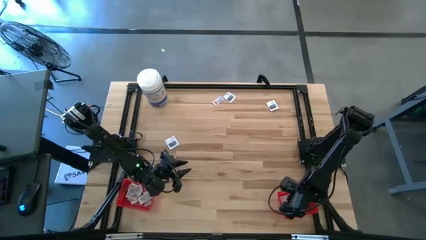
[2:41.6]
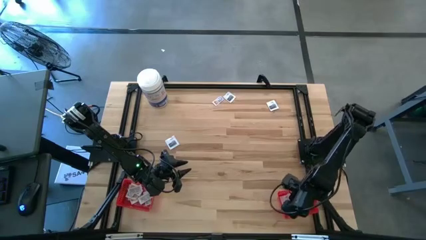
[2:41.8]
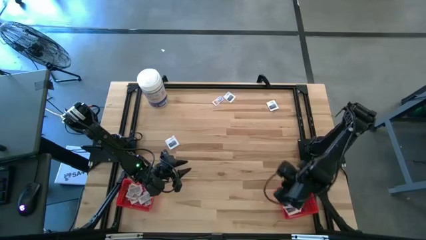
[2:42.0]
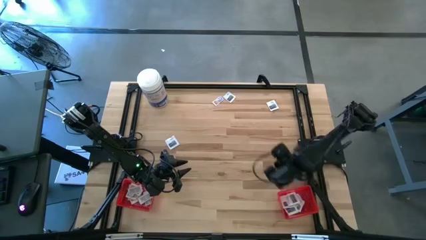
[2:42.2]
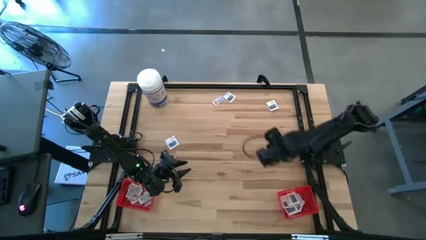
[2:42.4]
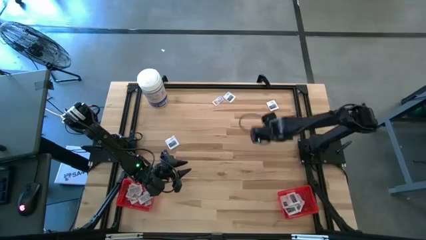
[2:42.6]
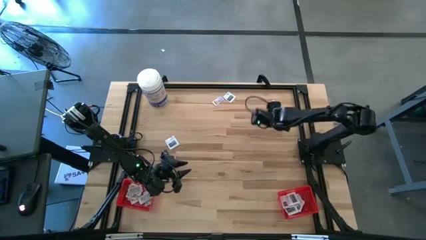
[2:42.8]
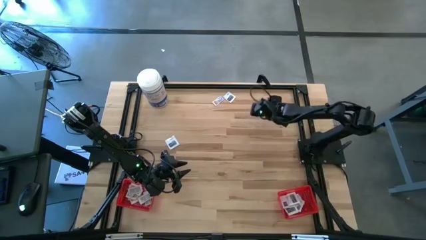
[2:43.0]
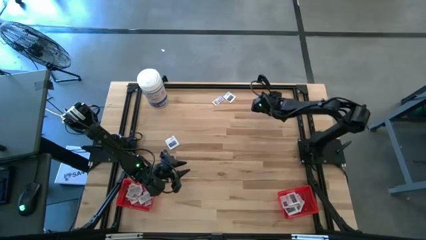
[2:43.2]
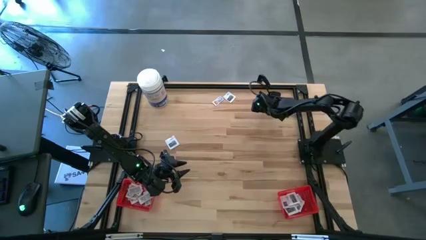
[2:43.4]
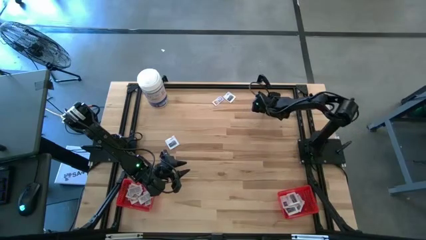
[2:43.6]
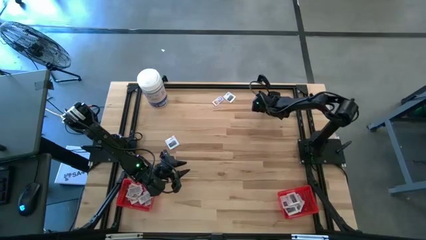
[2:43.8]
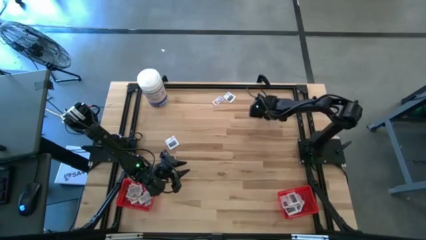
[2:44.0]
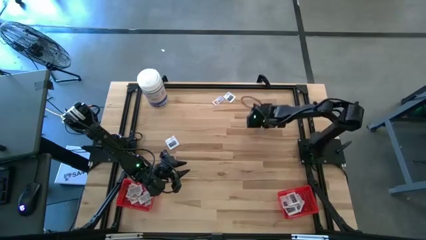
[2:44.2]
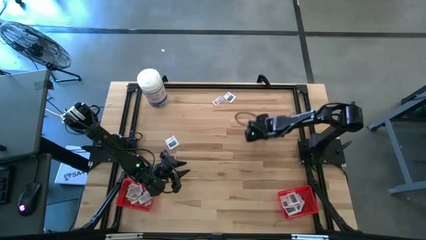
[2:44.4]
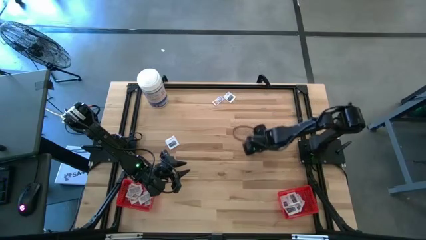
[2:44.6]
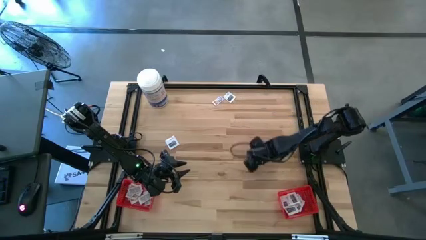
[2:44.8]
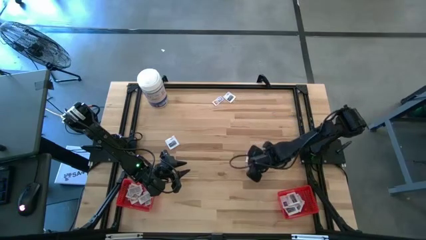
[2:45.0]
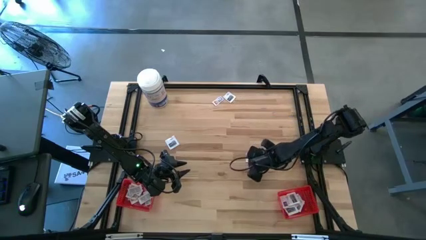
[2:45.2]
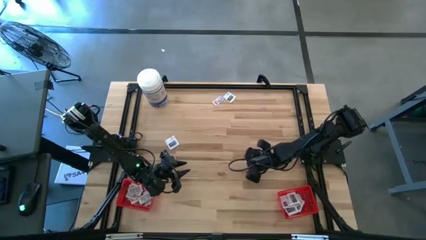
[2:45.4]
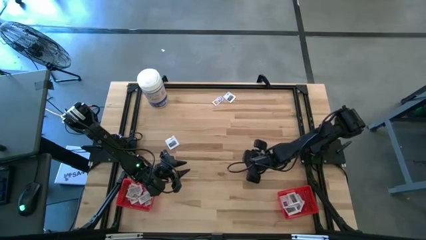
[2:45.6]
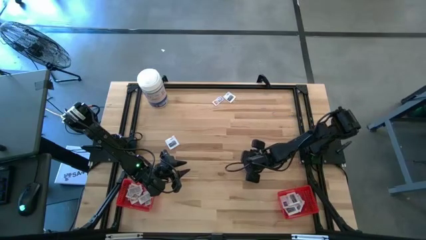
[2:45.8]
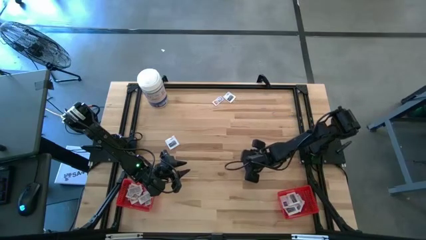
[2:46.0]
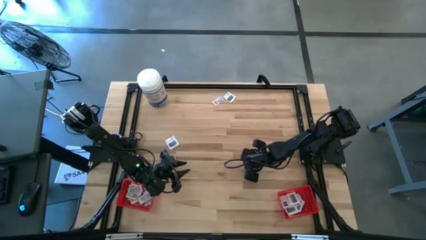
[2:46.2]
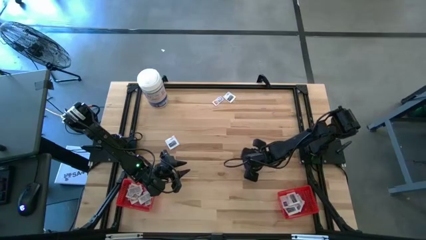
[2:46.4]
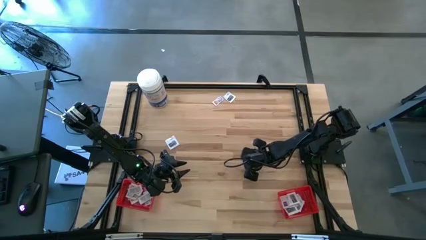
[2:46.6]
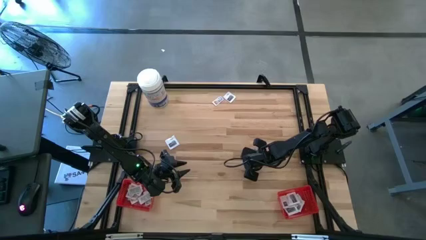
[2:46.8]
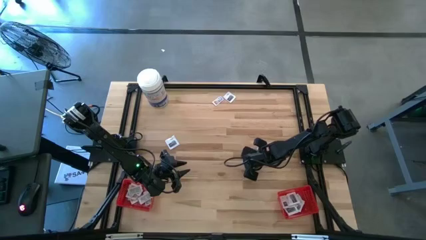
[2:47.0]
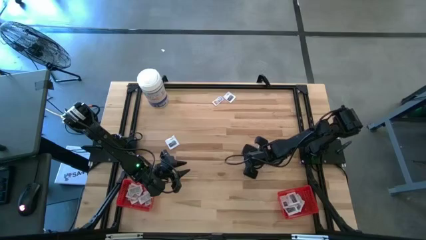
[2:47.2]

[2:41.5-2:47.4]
Task: Pick & Place First Aid Supplies
Put the towelette pack into the right red bin

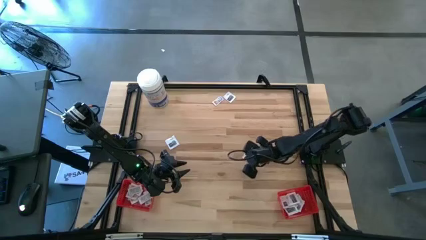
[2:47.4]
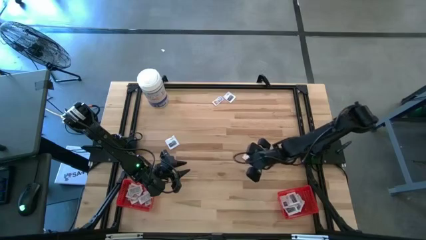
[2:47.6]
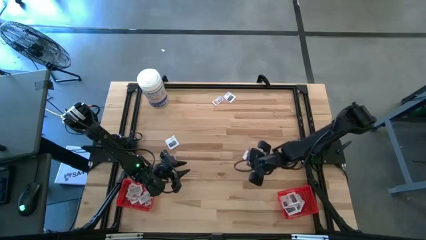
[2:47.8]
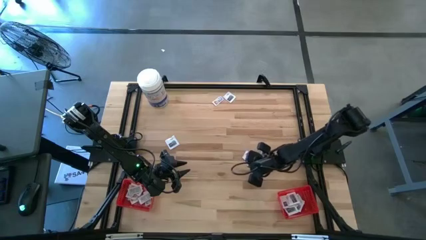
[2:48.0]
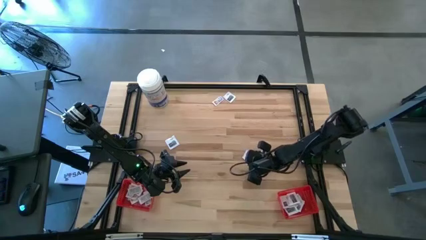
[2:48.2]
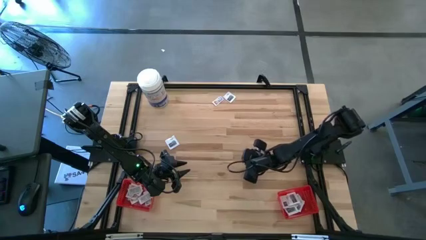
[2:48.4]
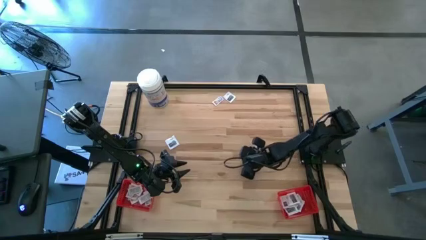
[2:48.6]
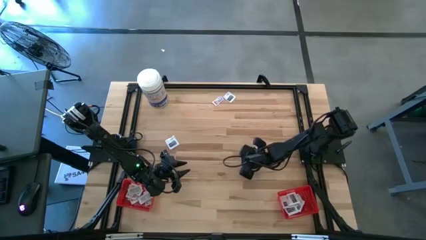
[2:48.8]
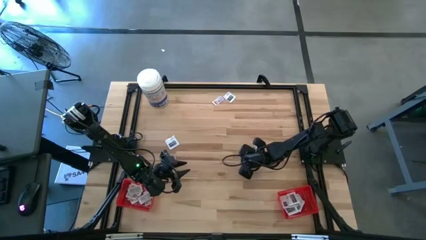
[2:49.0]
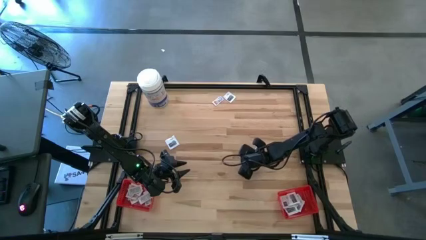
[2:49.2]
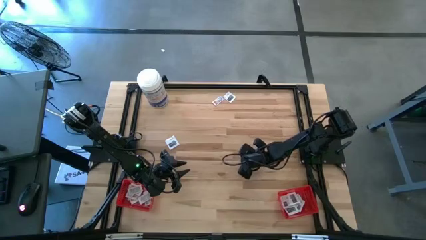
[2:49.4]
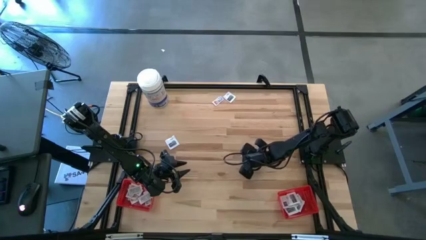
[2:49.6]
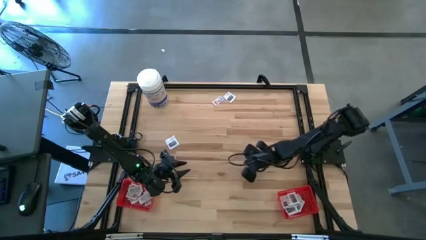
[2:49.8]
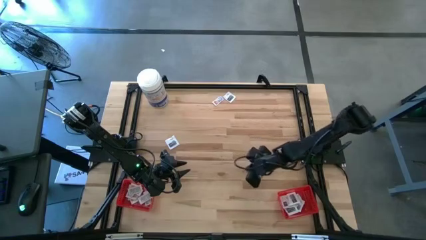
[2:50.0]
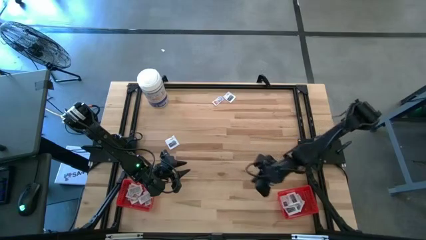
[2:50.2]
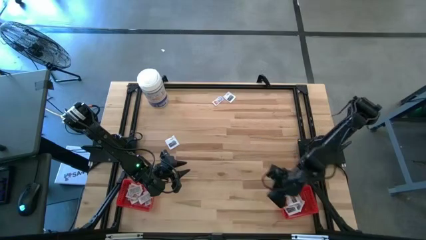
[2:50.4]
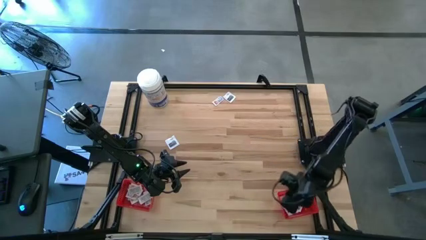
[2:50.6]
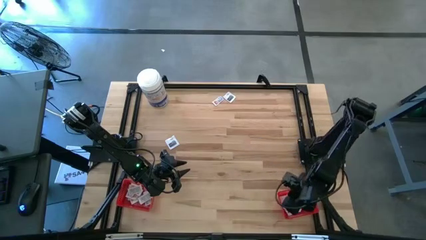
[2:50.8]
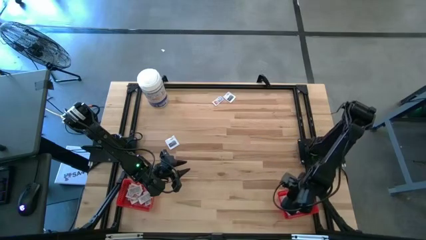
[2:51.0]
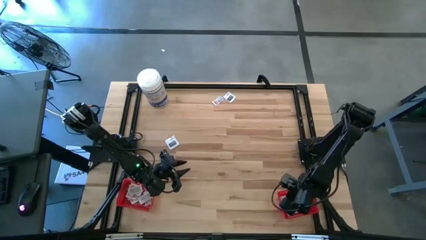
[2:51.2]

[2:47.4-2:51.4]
Put the towelette pack into the right red bin

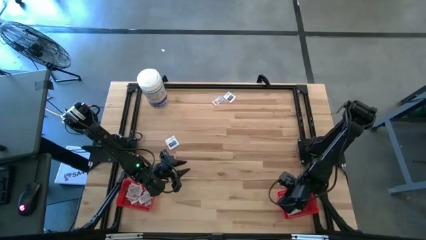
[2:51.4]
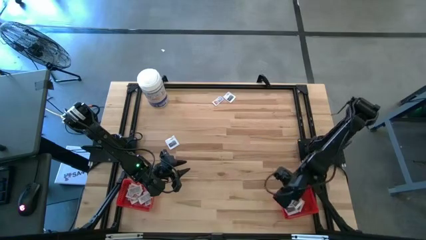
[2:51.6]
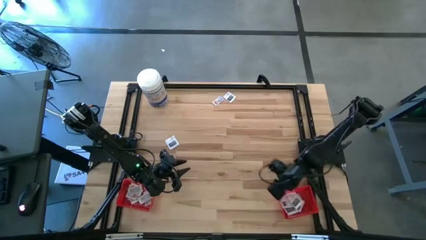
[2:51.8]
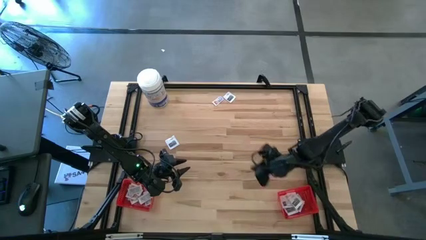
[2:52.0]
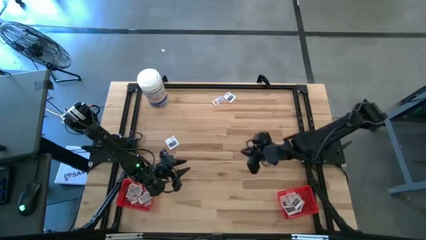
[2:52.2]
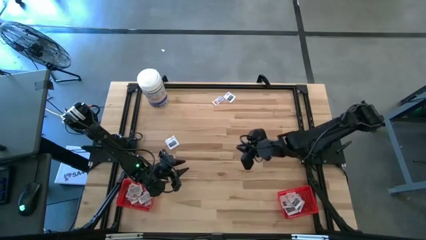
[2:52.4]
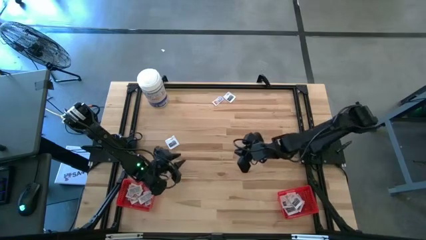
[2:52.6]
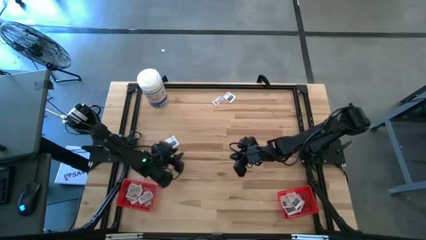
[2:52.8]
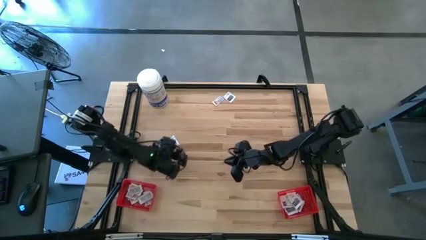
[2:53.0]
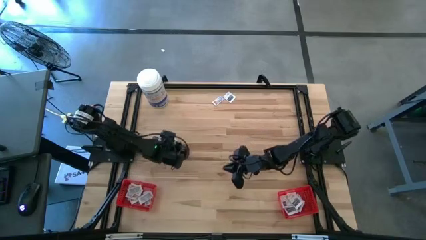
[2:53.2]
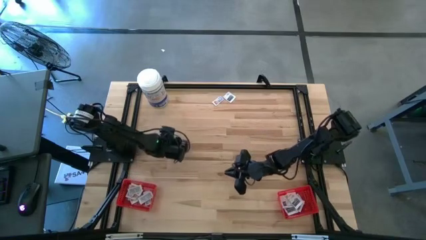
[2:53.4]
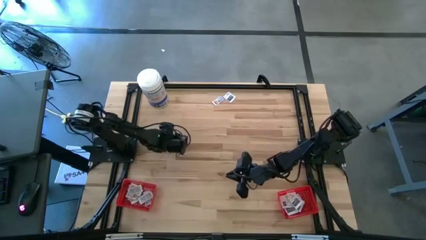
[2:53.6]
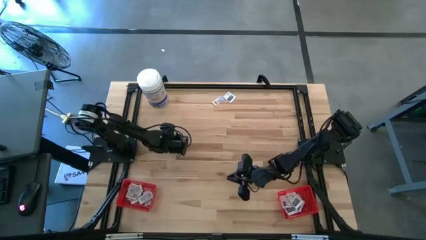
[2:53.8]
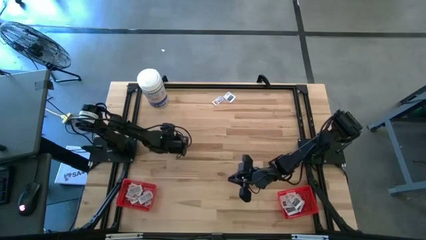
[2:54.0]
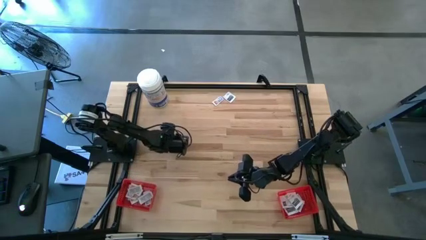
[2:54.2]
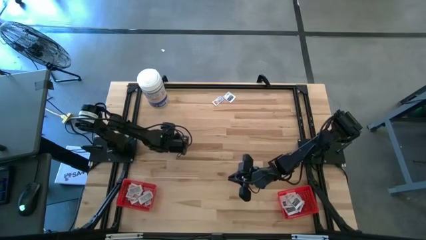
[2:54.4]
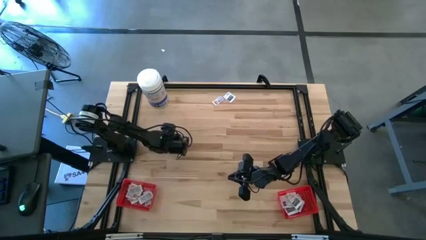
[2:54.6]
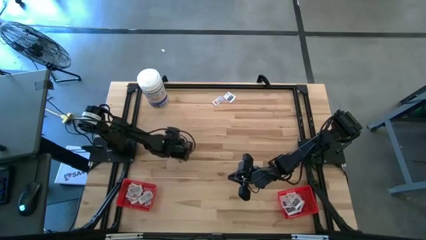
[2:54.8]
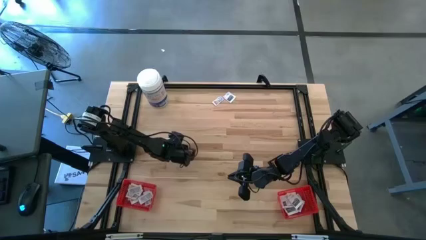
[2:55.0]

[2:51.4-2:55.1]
Put the towelette pack into the right red bin
